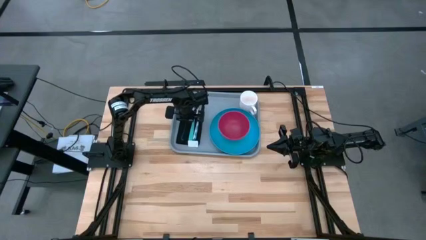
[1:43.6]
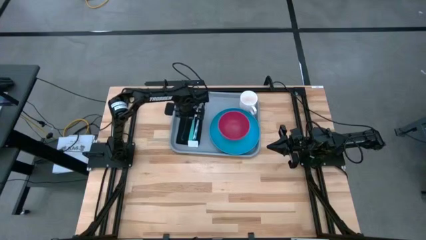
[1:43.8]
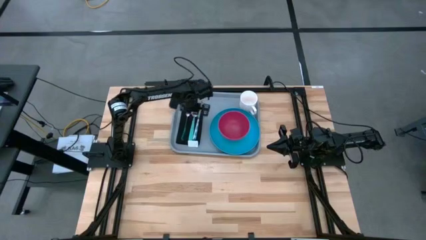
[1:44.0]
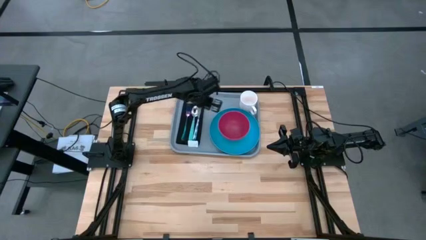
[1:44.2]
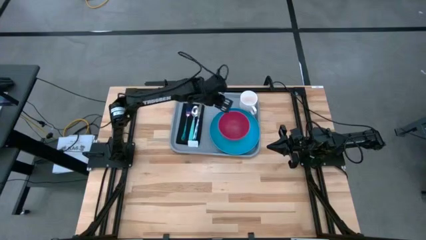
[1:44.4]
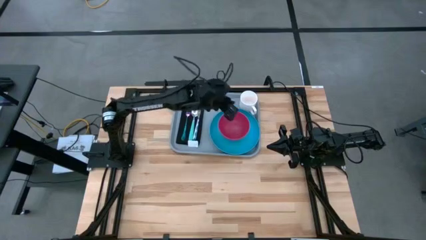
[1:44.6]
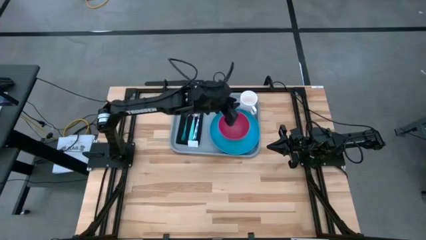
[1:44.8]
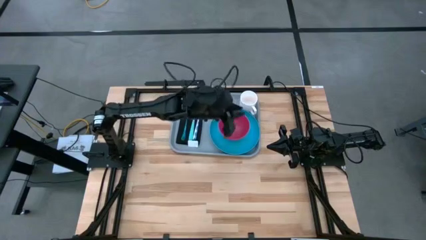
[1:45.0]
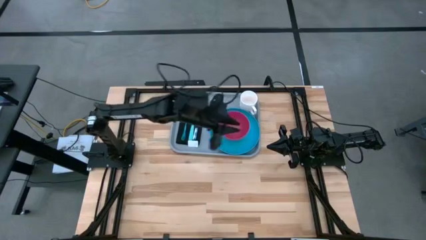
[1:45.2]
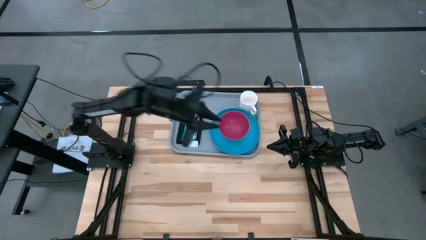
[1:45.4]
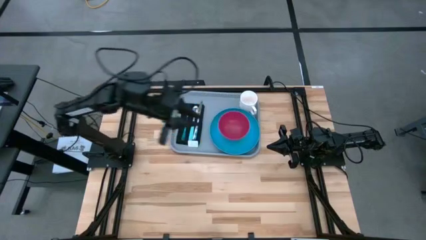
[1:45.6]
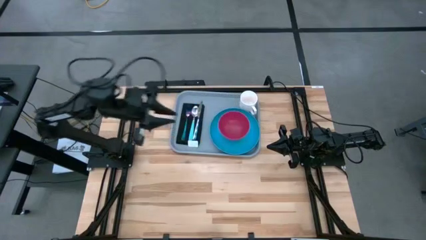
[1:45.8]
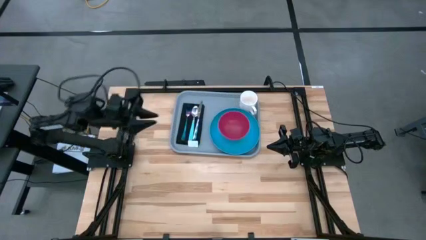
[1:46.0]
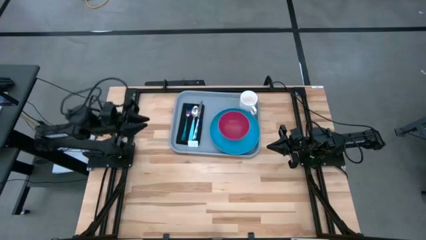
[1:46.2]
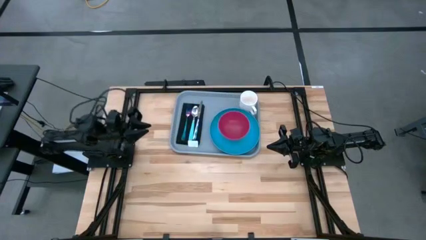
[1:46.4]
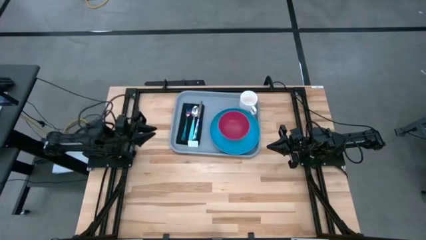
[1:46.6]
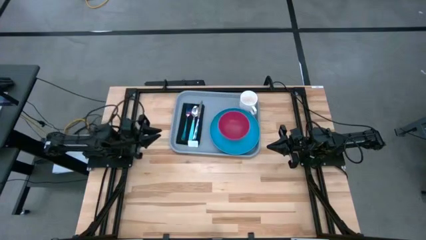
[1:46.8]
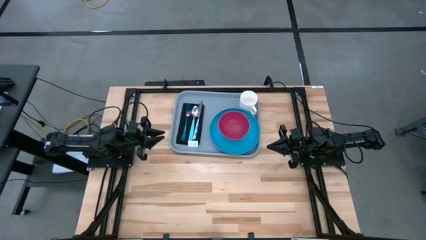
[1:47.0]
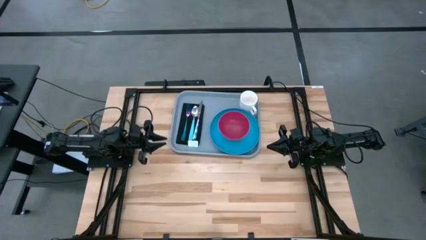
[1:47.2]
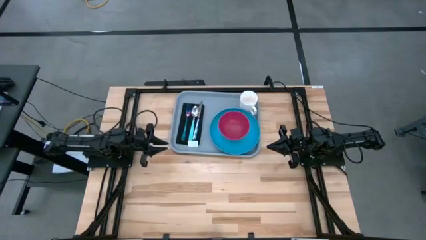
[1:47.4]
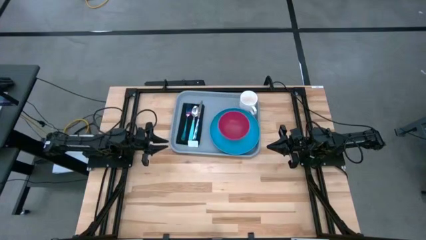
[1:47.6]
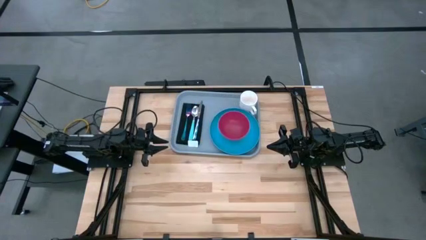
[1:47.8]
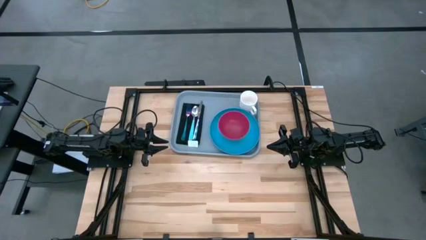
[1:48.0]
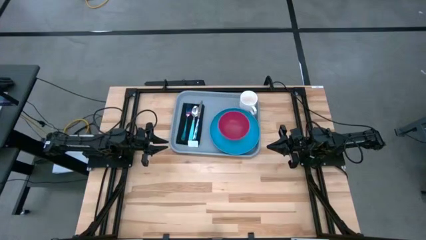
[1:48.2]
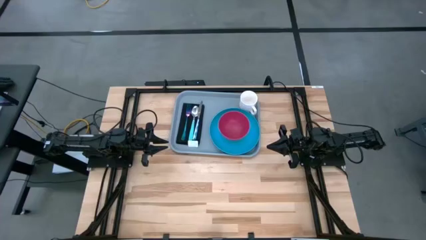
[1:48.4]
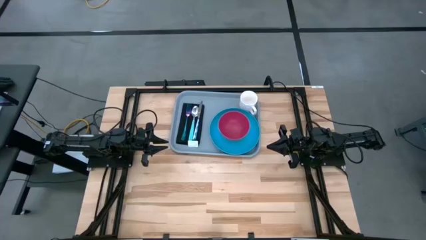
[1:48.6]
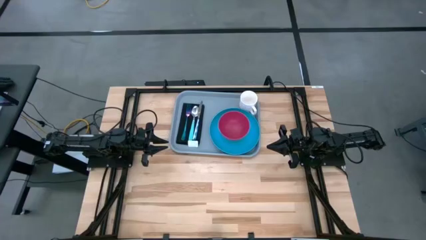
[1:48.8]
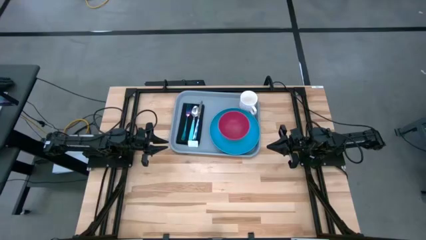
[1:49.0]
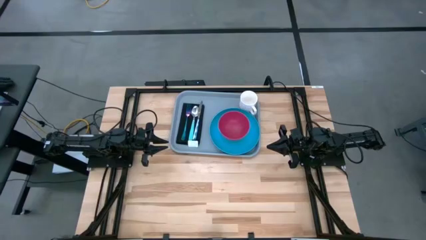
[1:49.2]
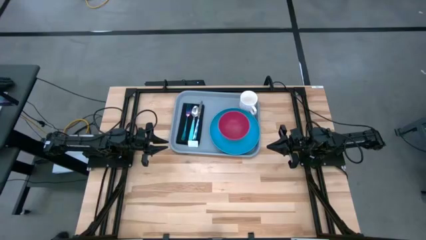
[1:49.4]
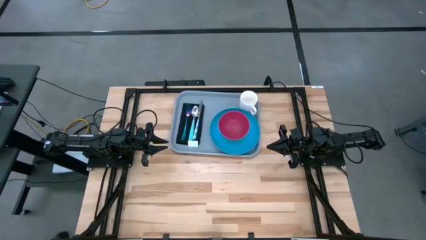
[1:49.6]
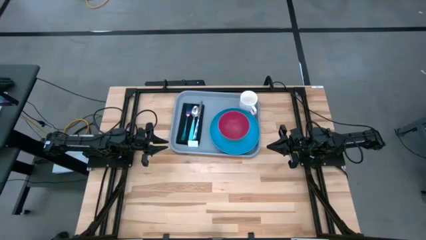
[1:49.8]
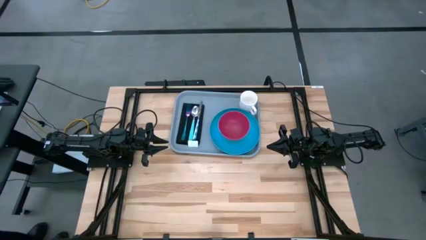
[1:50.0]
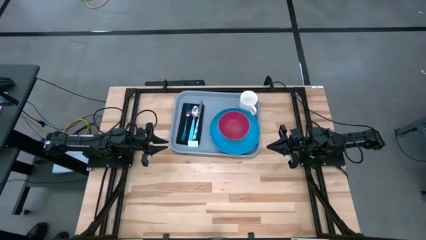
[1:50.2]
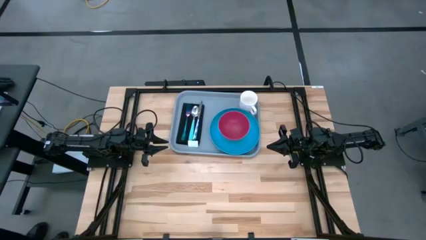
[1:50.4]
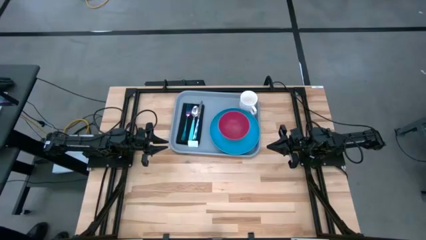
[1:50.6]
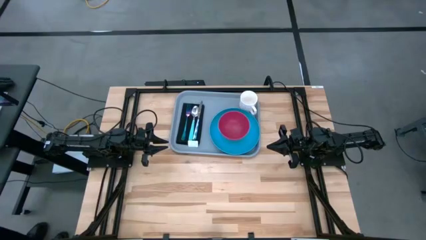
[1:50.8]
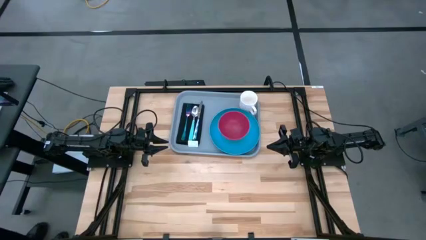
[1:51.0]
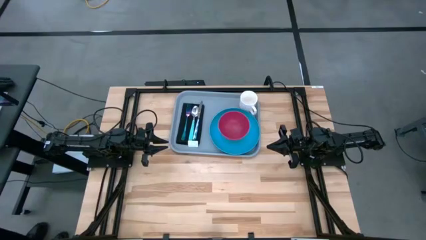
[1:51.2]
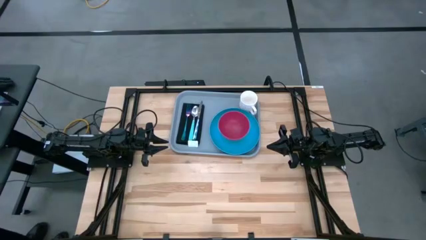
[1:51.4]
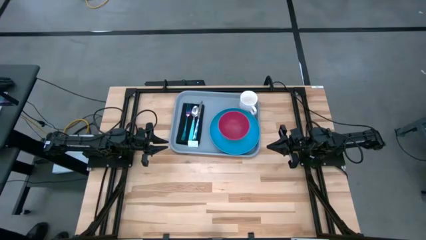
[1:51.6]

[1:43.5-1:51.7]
Task: Set up tray
Return to Home Position

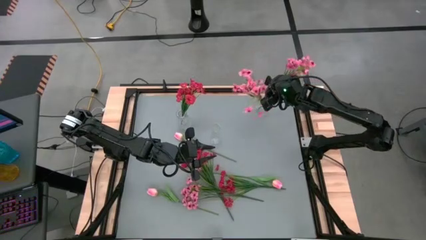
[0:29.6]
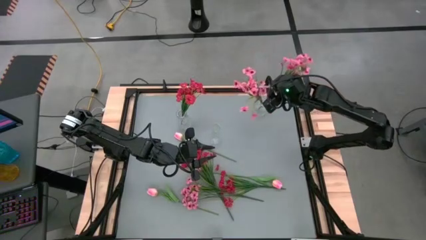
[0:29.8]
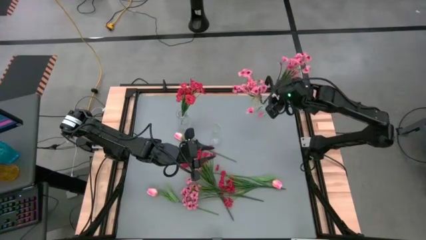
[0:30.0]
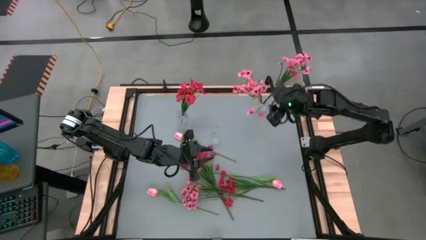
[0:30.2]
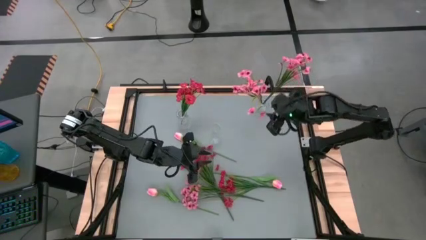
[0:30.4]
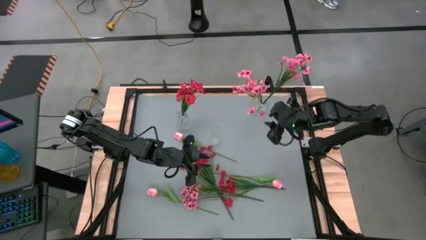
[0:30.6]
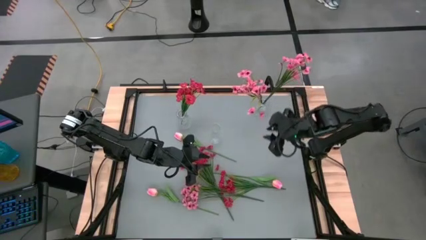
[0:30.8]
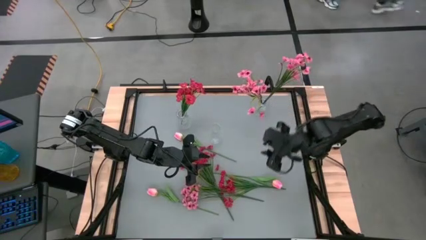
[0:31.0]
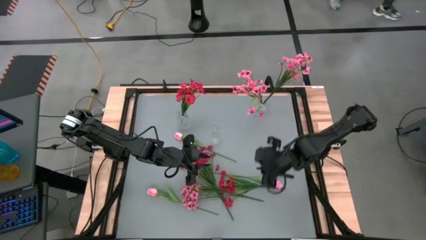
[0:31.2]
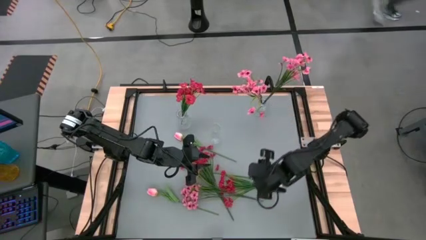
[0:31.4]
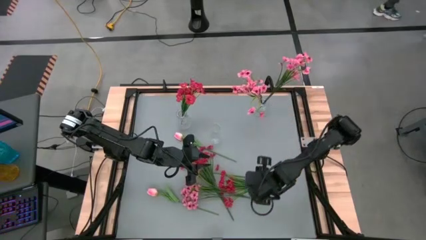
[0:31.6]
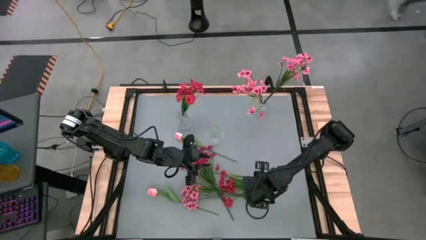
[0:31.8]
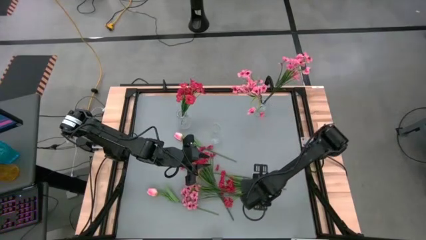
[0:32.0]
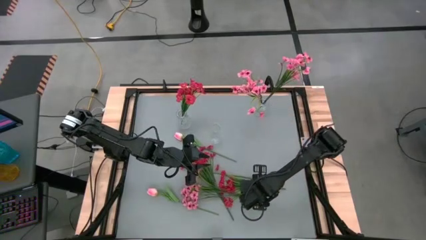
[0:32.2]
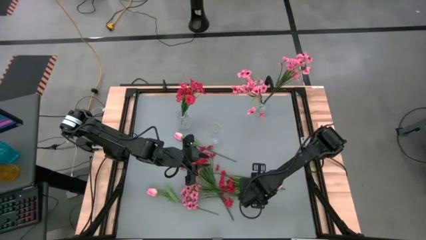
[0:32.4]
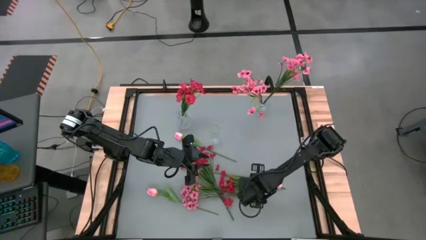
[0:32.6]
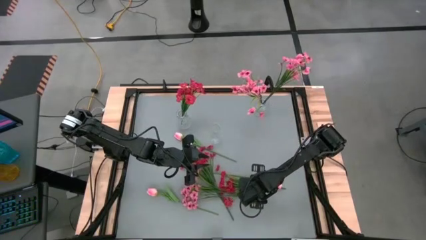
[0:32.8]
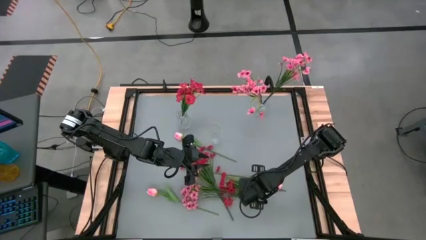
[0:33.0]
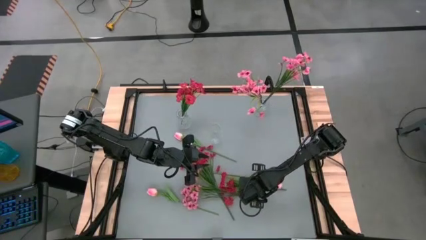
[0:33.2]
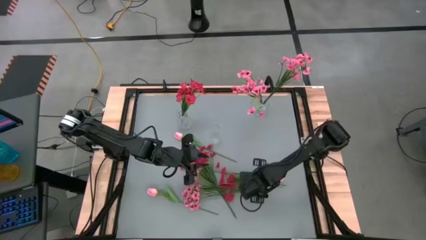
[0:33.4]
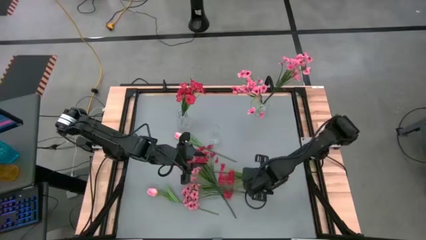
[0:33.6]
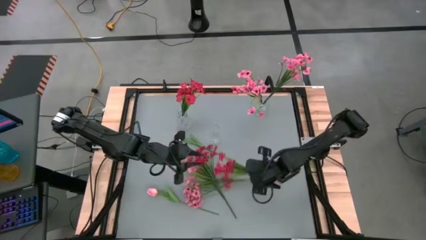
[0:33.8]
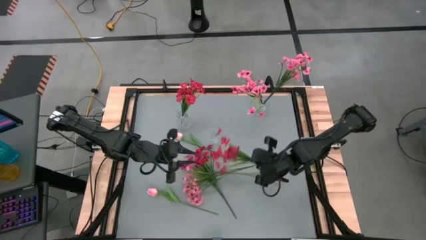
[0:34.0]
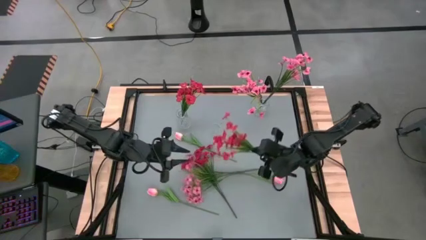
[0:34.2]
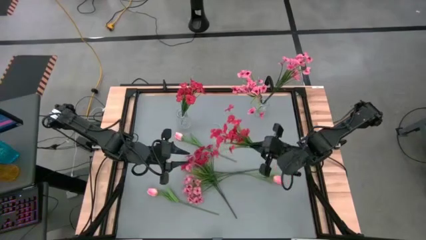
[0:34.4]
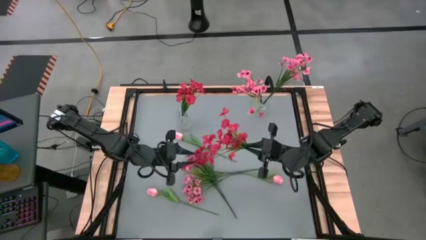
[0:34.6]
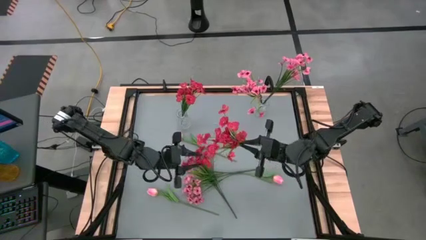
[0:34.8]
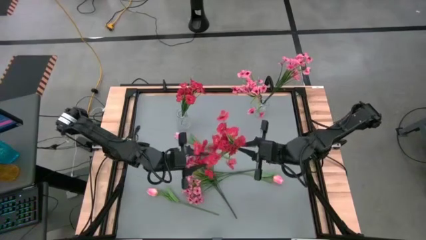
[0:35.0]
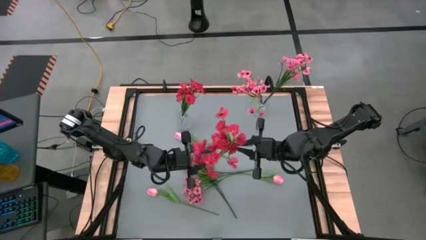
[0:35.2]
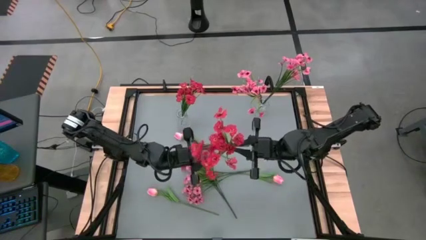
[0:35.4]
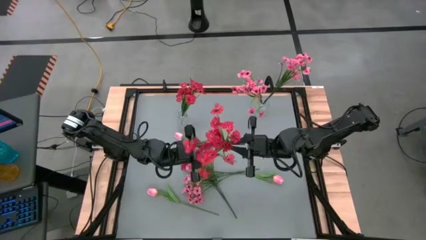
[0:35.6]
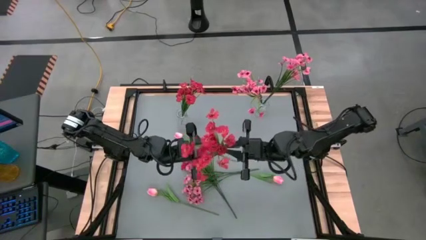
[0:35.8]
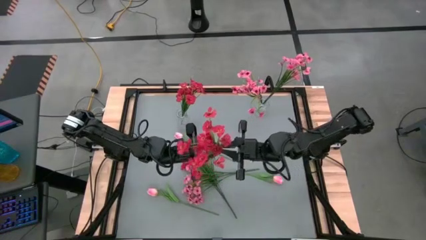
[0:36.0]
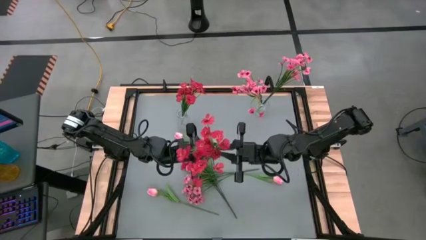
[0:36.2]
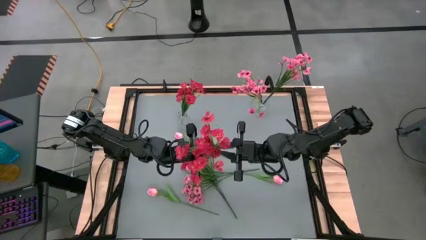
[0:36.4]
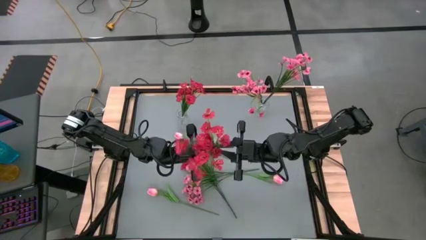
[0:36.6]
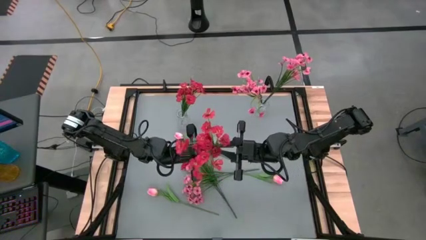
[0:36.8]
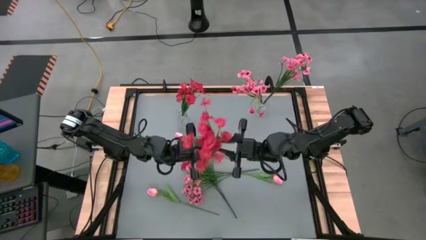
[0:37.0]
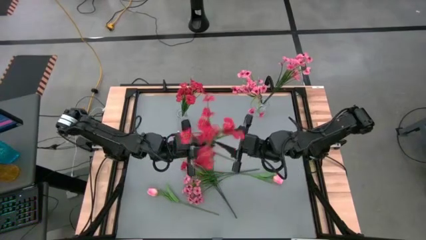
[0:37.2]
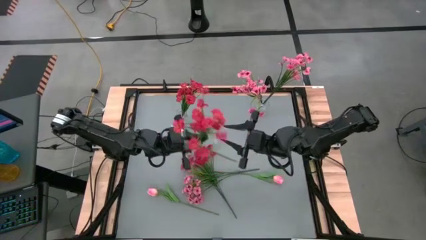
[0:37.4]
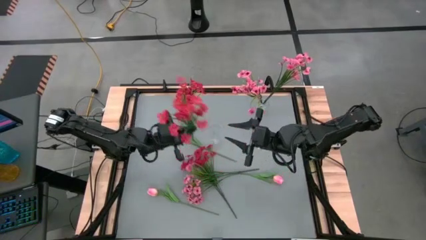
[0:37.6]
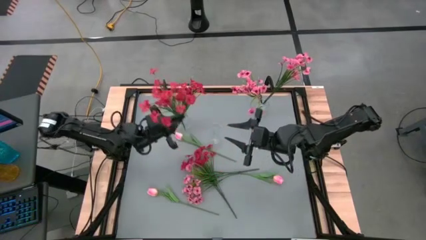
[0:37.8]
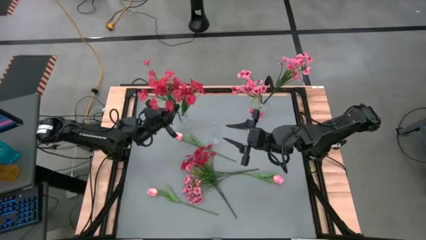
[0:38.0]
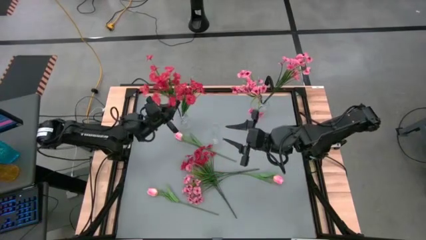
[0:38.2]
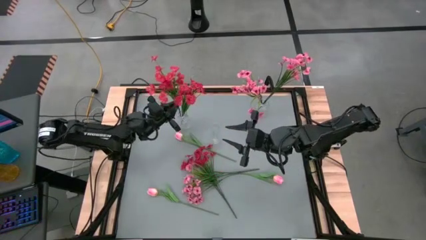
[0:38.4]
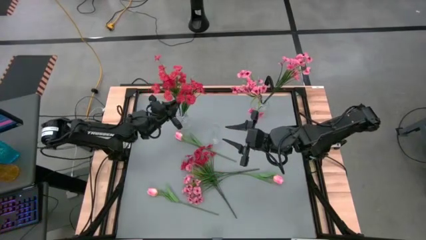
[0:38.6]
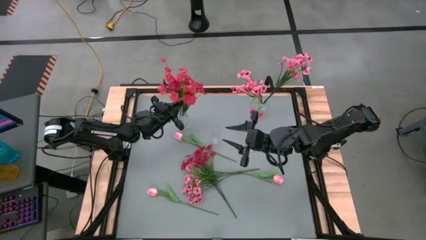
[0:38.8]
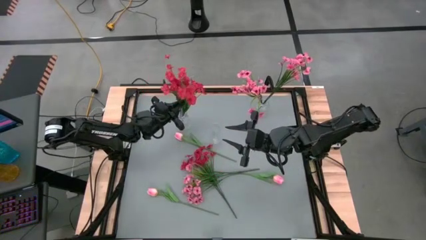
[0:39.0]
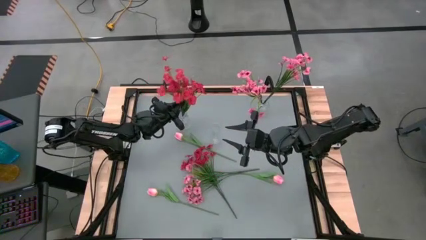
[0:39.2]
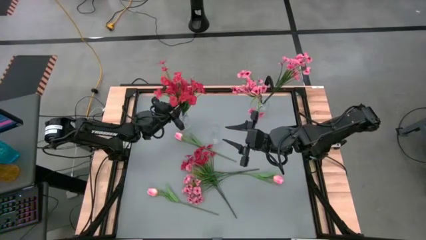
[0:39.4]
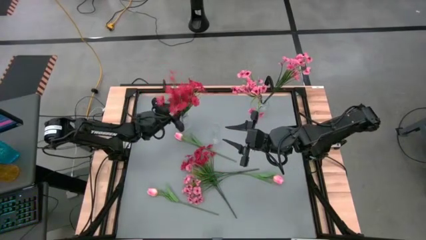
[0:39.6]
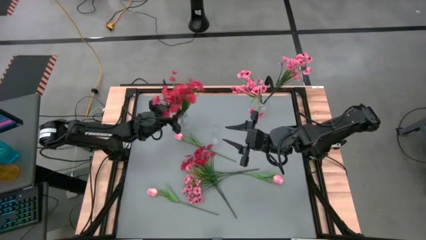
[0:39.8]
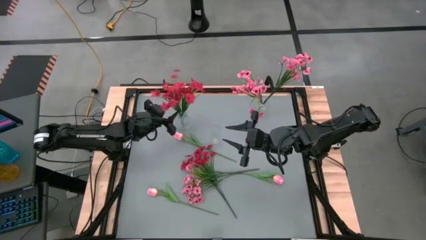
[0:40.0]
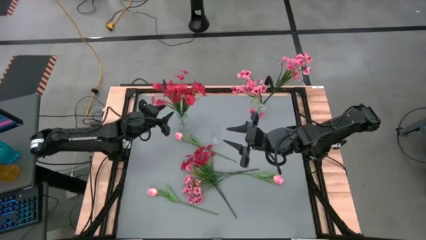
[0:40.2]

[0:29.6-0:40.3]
Task: Sort flowers into vase by color
Put the red flower into the top left transparent vase
